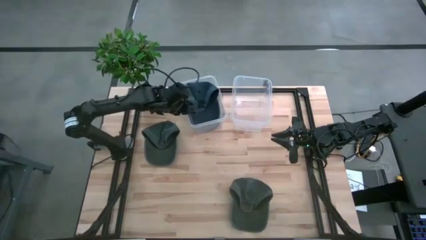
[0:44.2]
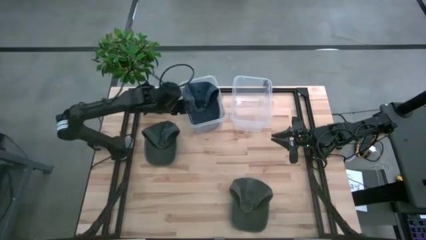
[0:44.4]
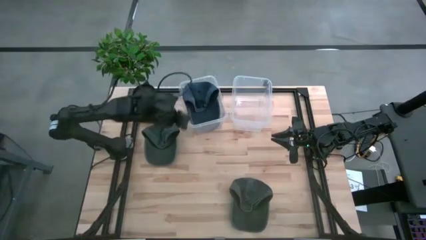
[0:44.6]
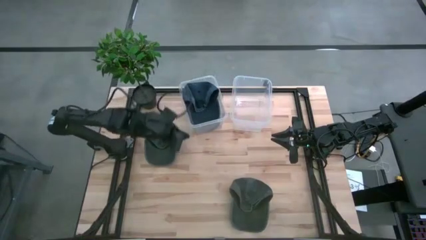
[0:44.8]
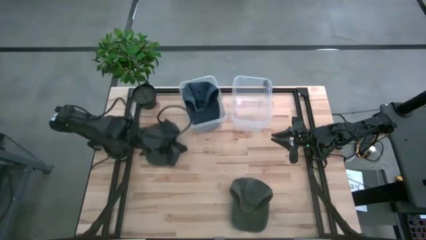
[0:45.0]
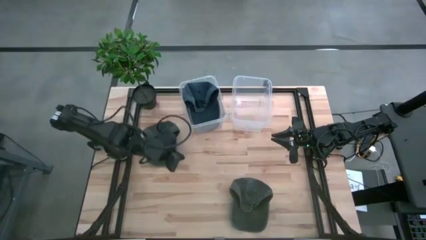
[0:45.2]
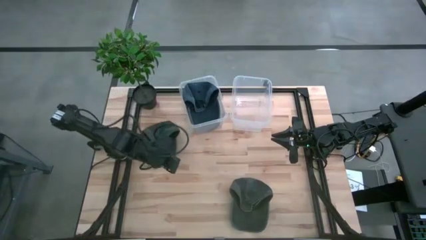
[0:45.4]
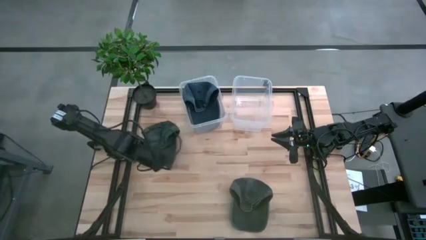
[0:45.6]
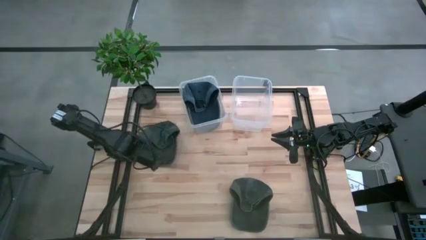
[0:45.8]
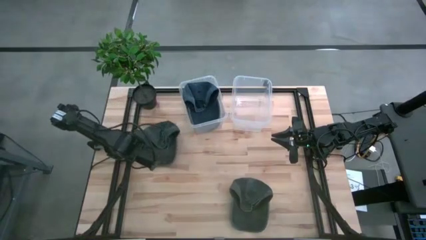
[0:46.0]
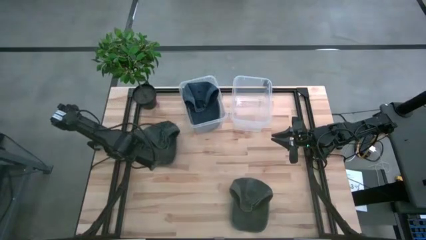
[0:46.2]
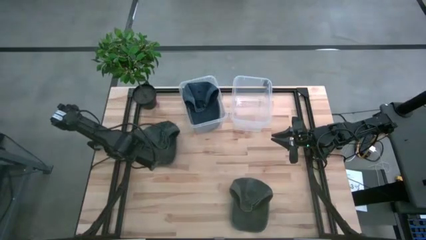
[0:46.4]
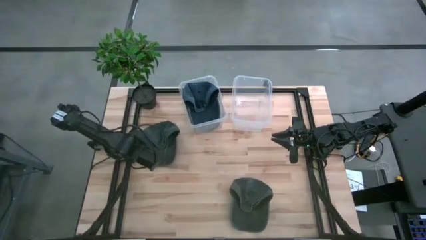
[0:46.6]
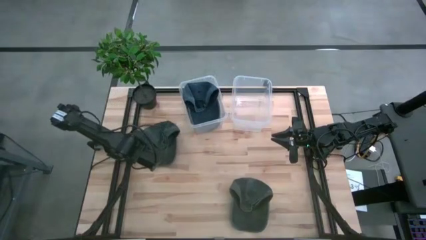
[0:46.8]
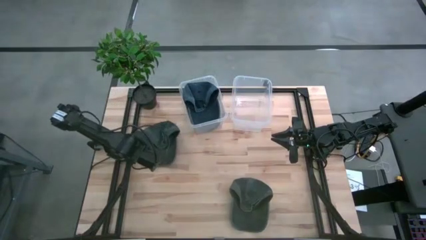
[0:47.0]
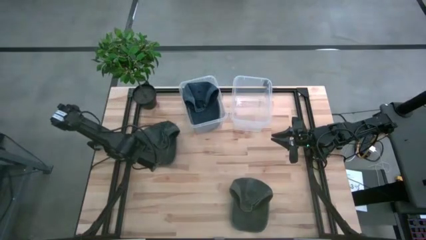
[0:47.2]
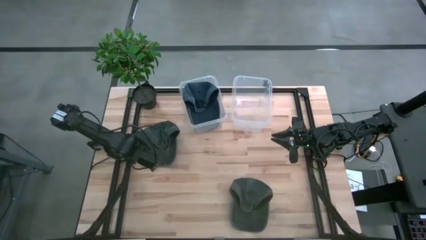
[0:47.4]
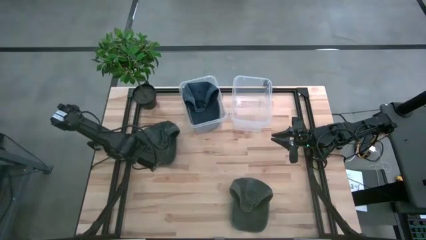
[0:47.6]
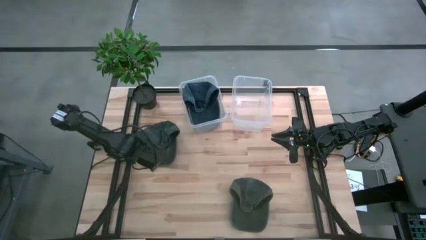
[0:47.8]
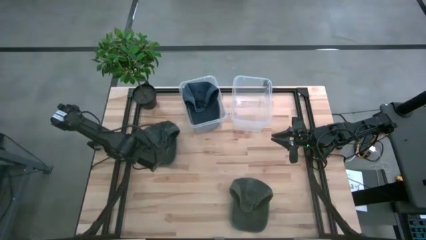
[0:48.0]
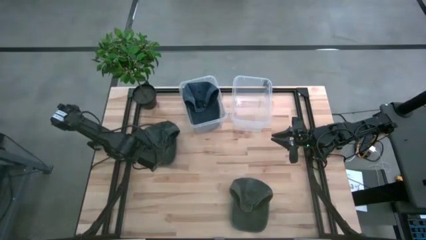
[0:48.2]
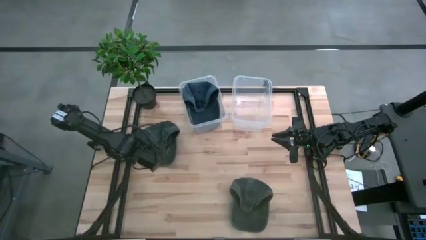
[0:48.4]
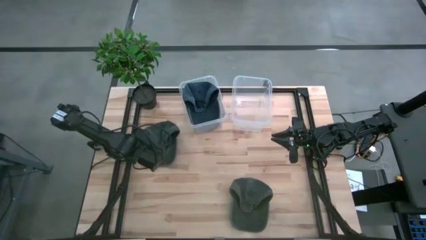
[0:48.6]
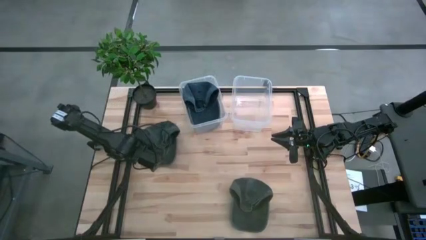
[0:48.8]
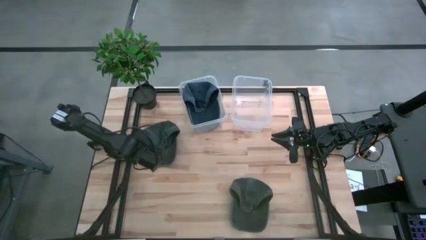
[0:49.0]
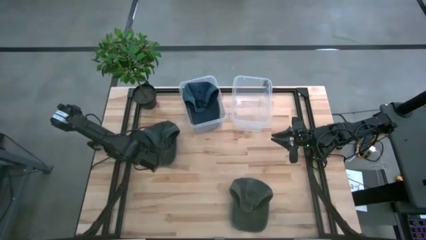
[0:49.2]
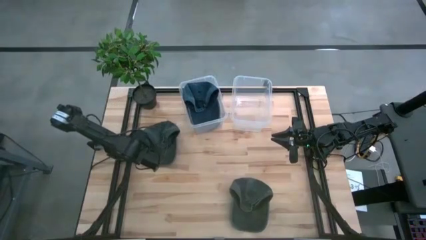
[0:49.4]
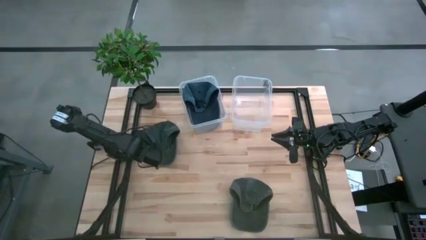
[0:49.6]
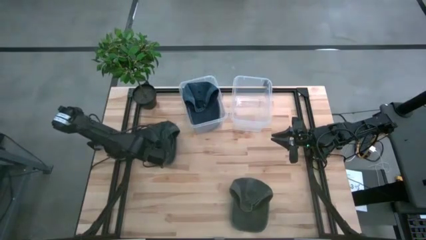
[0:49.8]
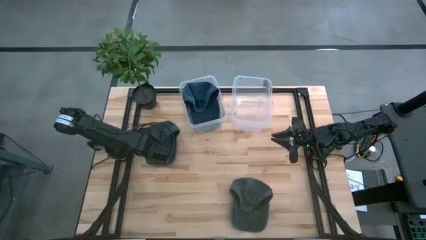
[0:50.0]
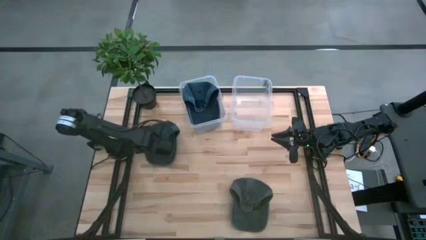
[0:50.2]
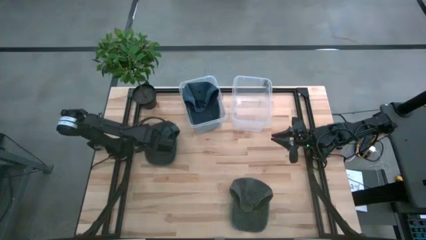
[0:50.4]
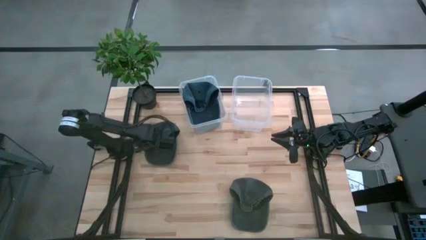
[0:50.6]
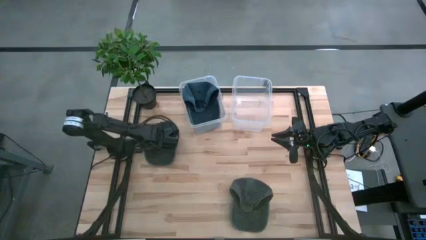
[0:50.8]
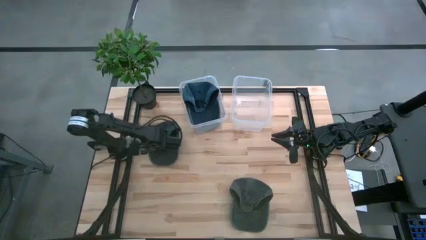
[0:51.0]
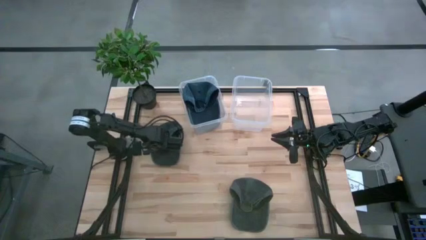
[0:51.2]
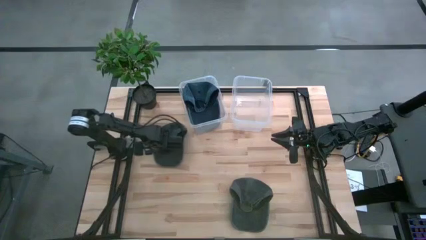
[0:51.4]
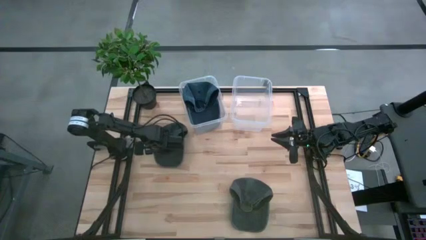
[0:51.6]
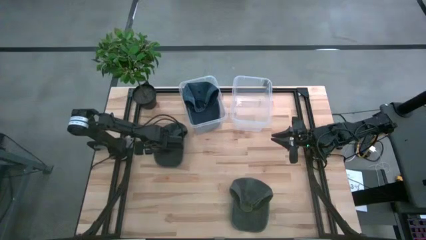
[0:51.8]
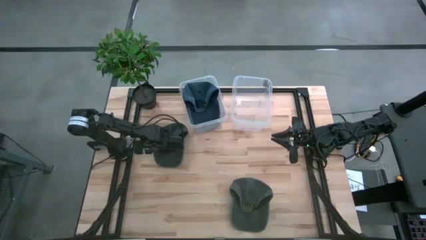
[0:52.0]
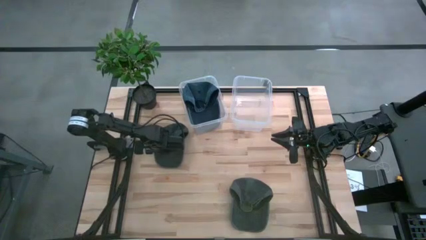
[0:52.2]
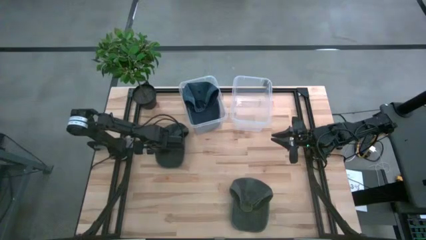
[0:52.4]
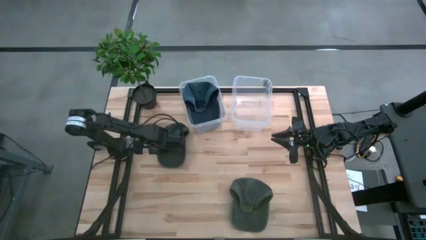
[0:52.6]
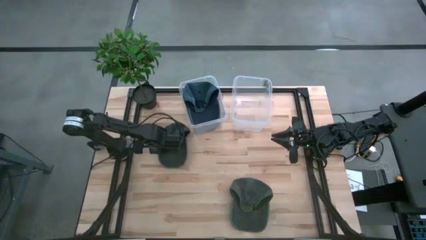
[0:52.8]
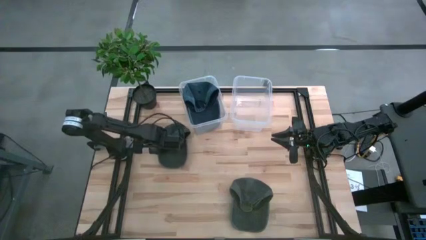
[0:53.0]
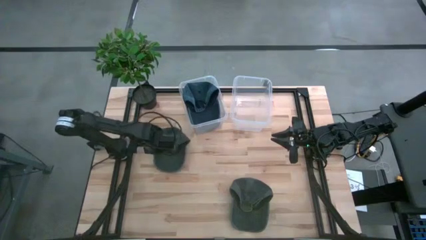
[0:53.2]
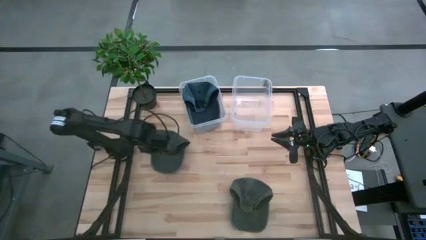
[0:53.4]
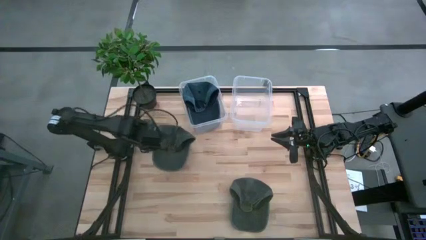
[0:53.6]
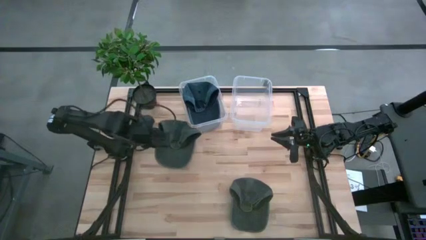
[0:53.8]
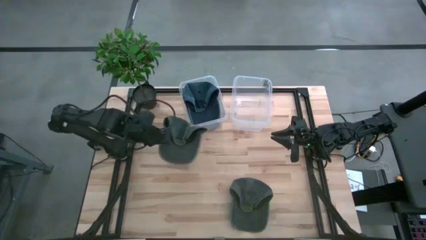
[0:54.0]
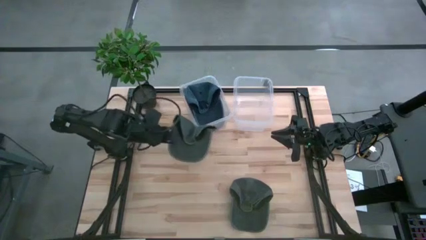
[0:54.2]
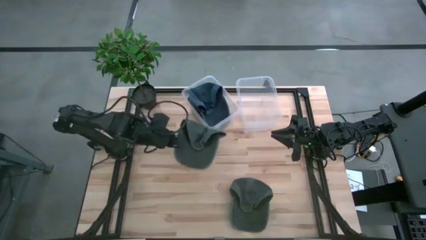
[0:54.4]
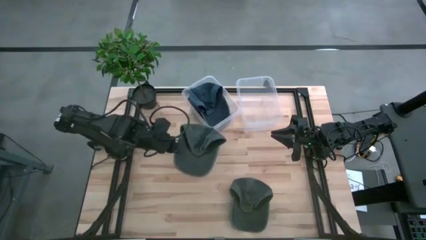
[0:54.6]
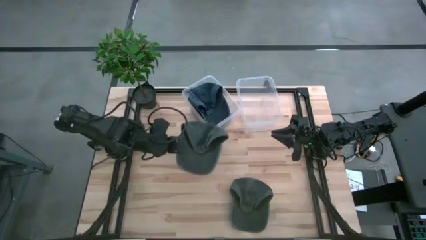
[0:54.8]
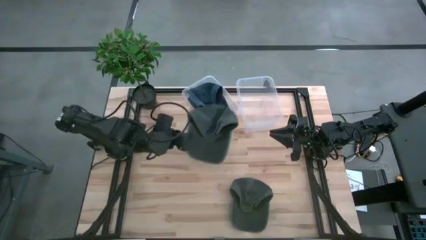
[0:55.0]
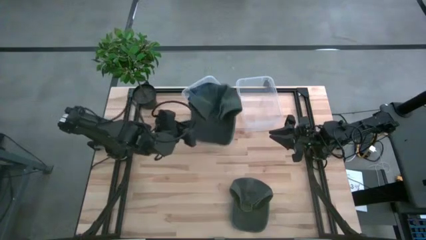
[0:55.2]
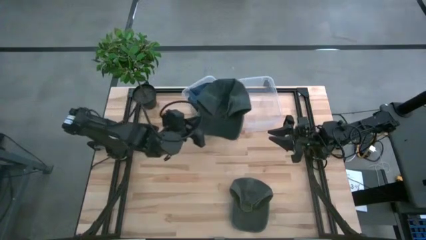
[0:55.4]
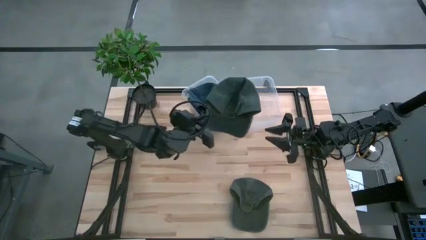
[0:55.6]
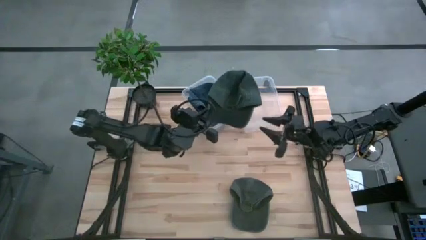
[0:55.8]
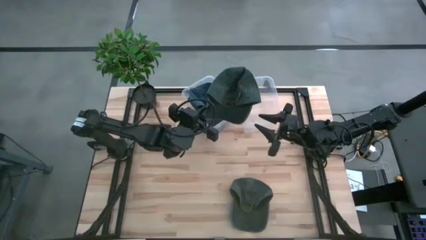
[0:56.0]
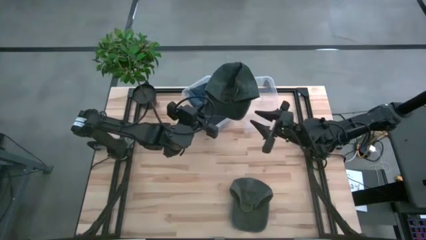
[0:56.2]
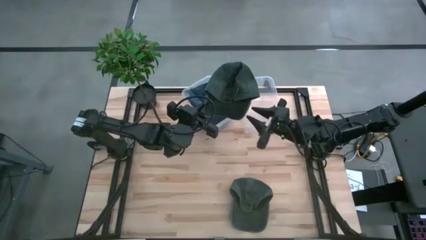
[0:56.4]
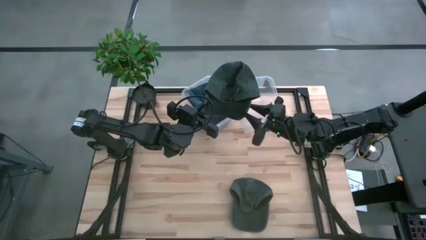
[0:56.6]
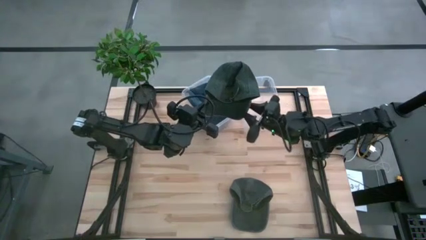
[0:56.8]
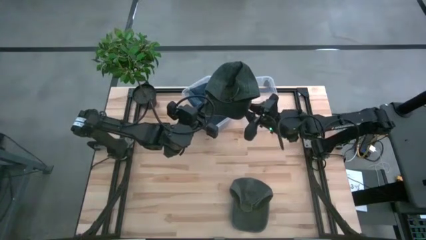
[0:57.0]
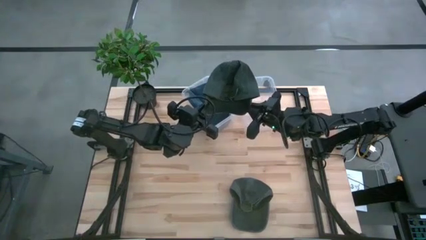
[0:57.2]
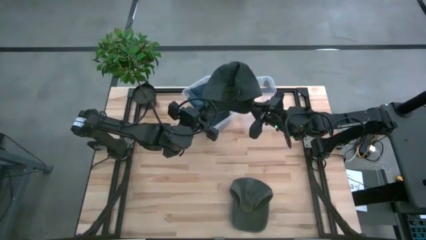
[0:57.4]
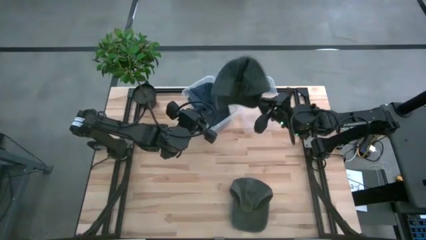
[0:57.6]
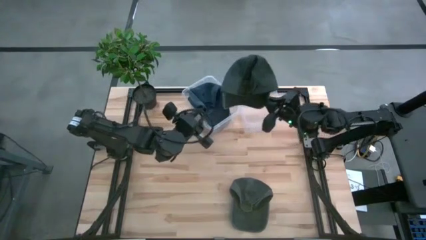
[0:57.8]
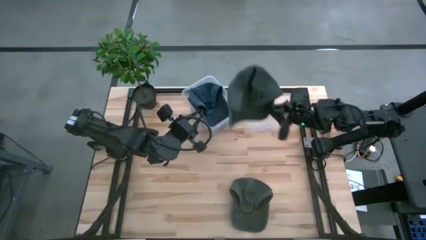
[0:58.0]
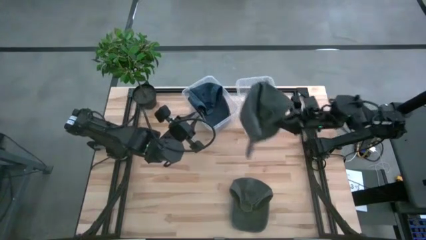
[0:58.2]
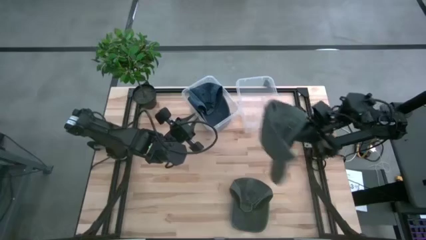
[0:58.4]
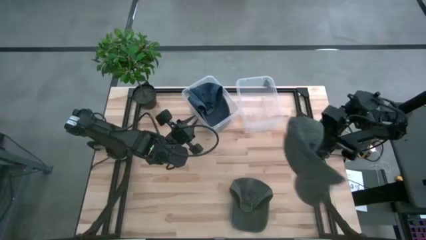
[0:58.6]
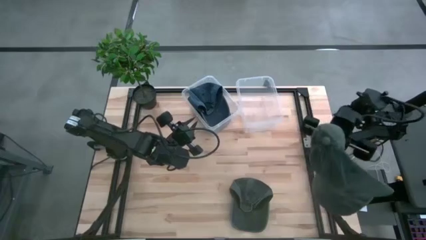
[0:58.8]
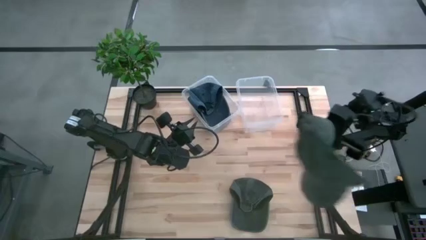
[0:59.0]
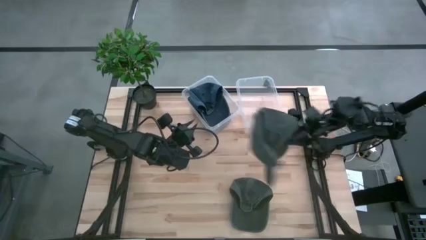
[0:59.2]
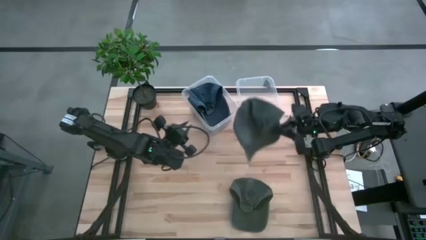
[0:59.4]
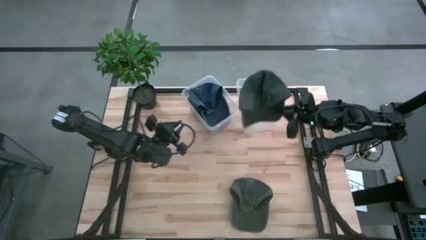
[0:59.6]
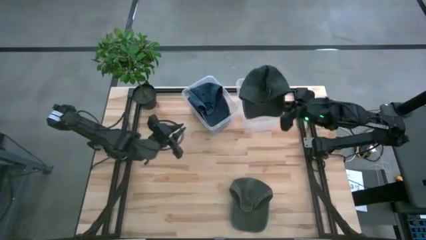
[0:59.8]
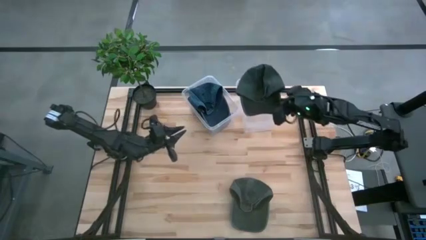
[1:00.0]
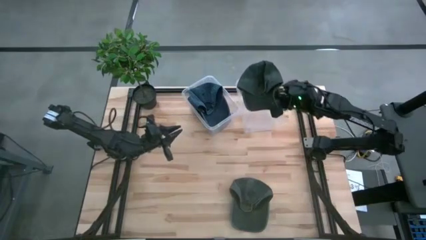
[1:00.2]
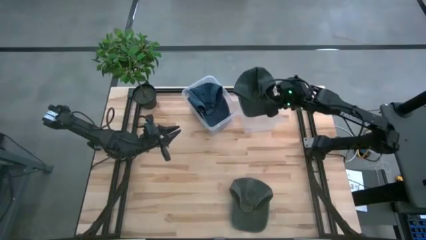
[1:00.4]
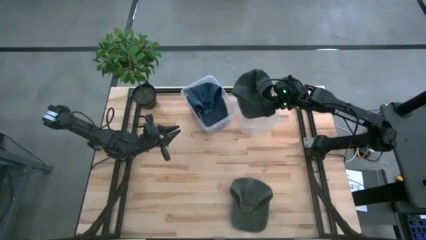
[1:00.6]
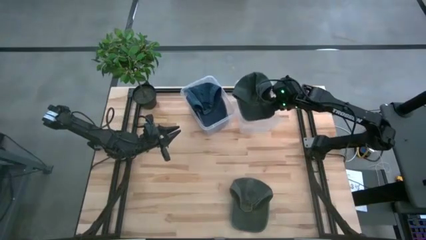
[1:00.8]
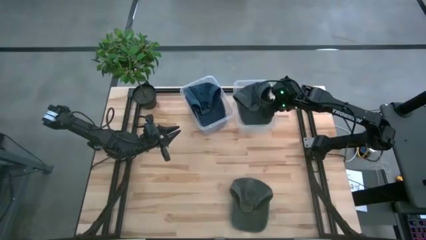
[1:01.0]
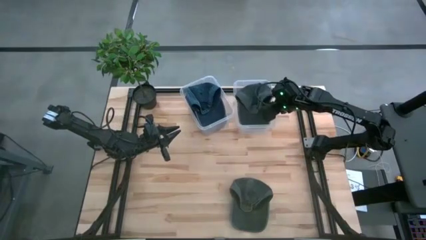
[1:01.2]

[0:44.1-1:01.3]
Task: Pick & Place hat
Put the top black cap into the right transparent bin
